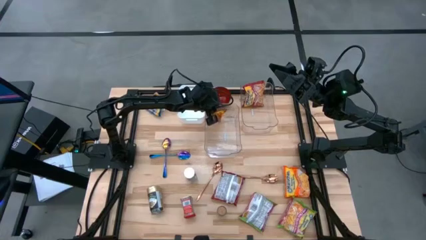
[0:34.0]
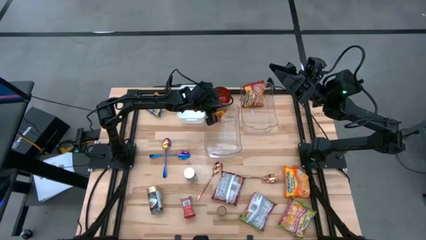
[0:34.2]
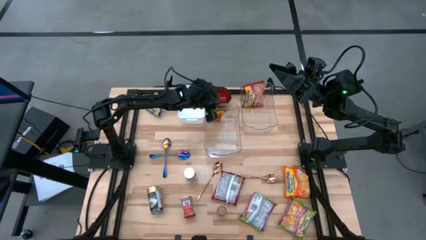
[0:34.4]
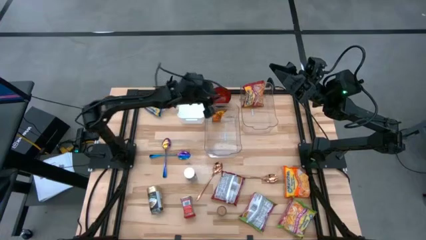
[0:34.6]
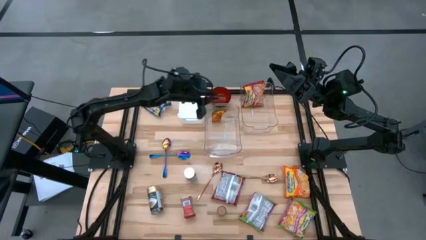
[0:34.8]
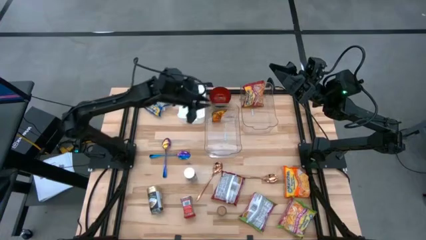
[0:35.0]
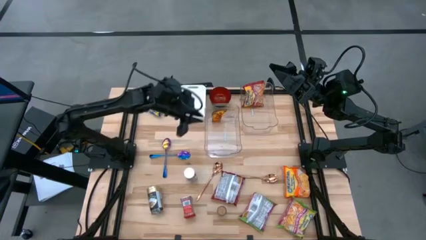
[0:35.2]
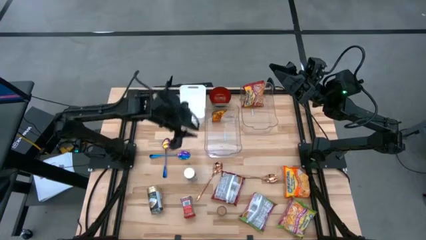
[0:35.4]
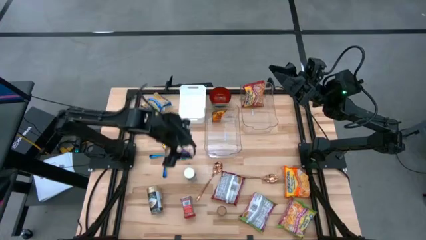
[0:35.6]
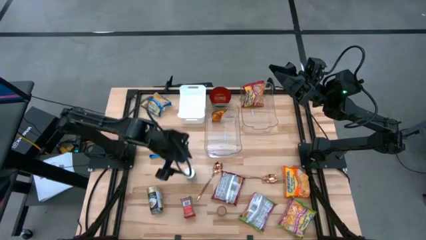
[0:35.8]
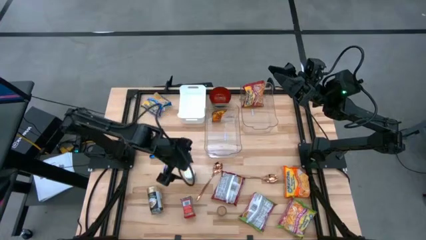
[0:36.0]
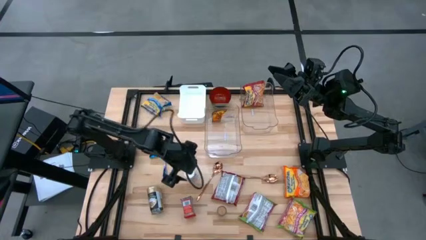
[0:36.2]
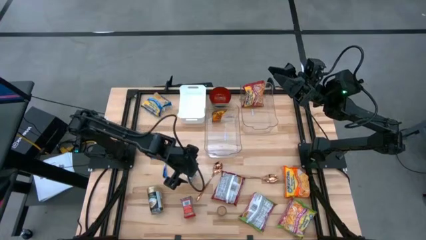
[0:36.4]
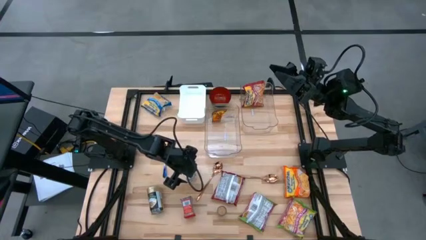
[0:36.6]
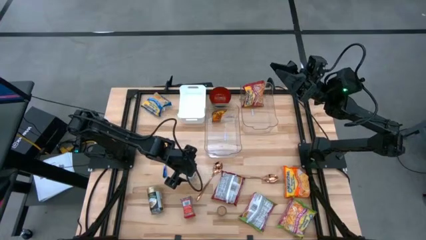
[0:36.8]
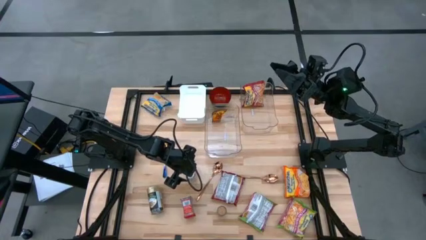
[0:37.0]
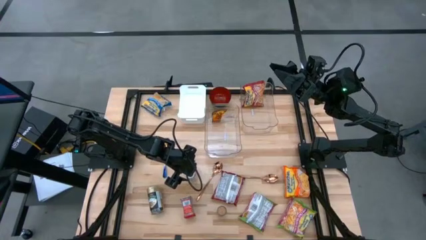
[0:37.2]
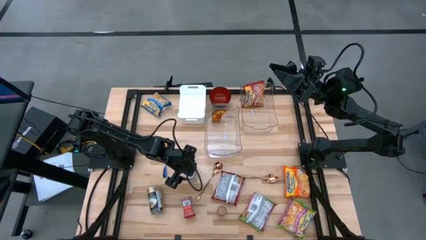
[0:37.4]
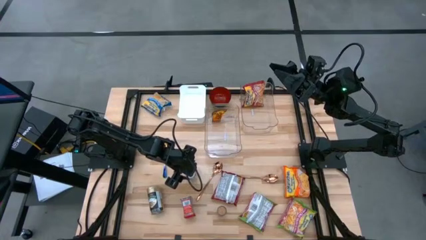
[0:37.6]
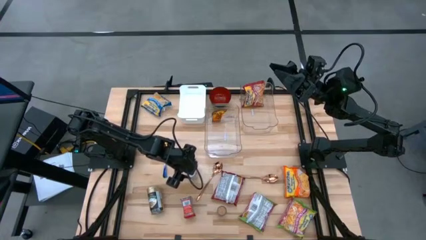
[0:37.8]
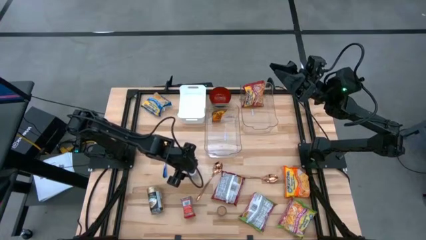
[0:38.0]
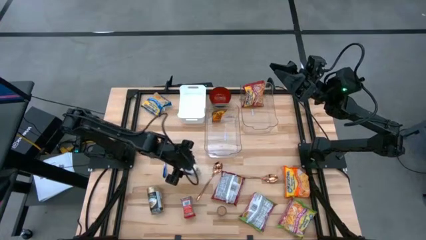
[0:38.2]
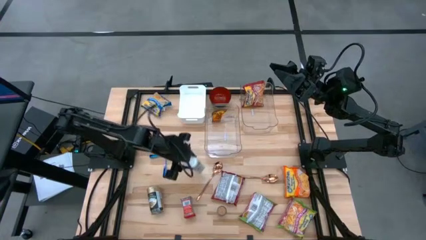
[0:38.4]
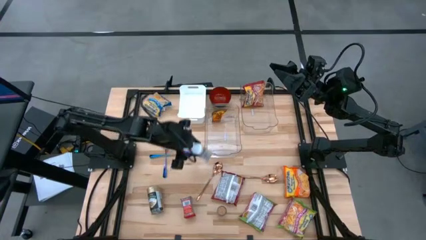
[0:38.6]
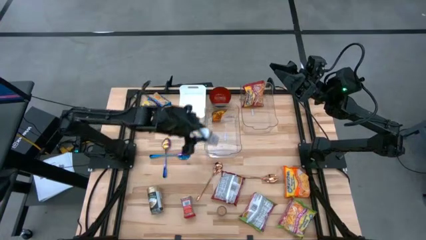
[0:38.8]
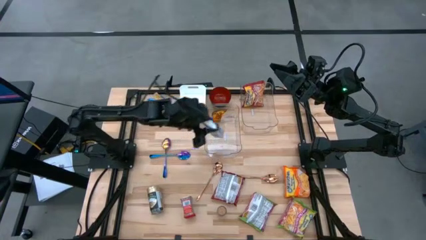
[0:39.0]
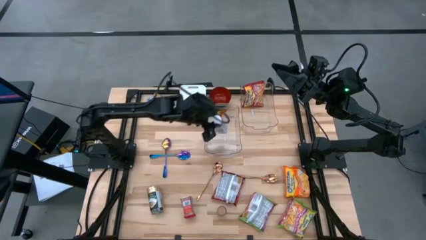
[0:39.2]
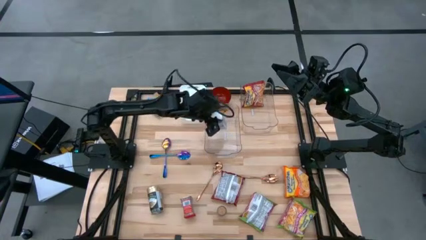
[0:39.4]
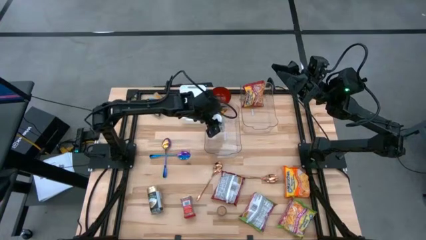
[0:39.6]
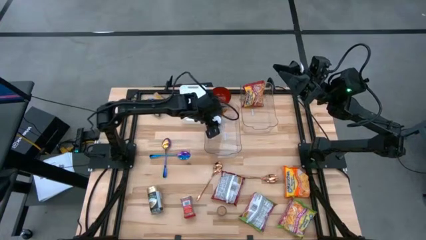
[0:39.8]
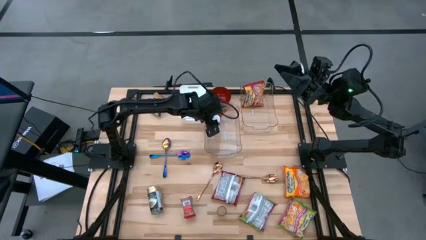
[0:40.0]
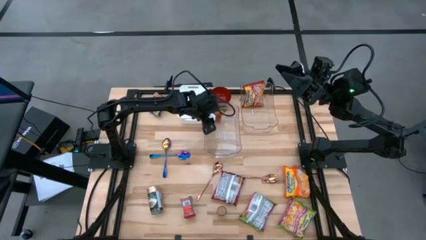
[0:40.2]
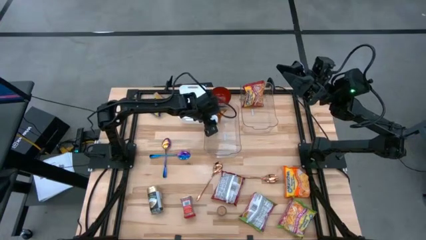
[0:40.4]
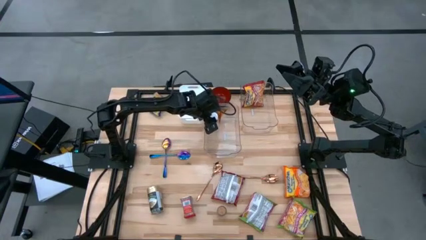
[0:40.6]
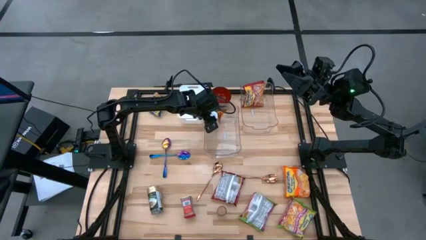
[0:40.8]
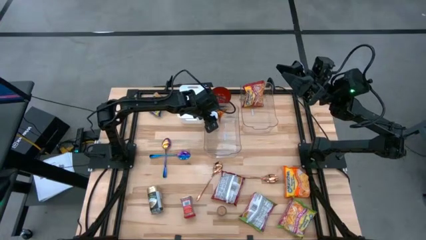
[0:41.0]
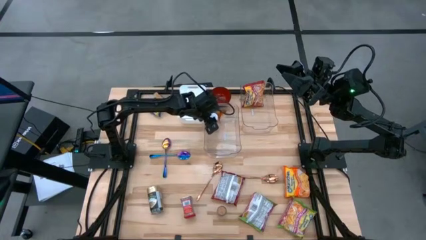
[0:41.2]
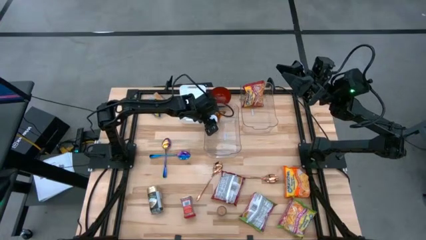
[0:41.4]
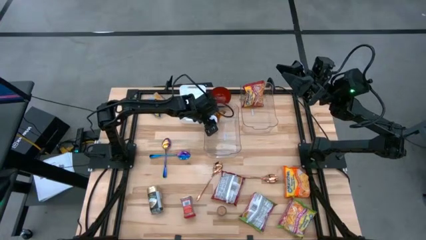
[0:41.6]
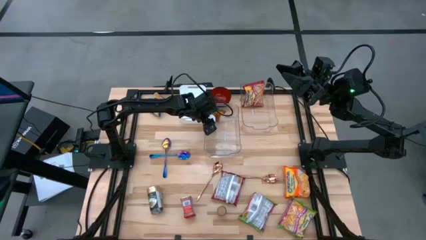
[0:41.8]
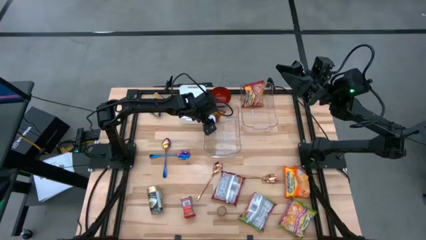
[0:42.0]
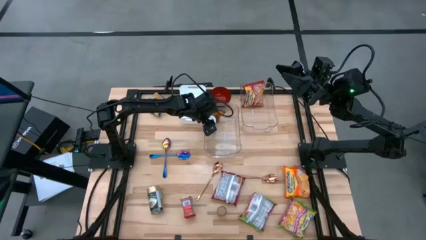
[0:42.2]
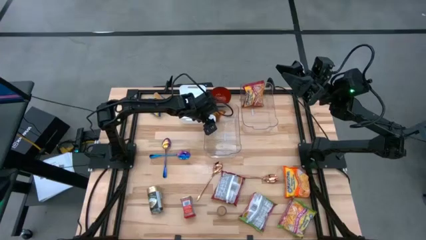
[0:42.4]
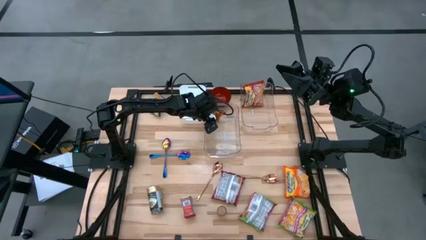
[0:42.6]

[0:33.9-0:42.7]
Task: Pick & Place Food Item
Put the white spice bottle into the left transparent bin

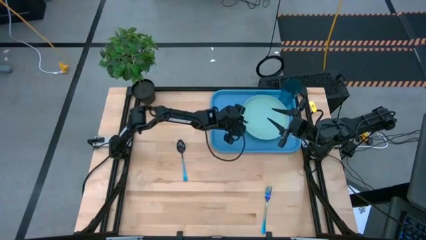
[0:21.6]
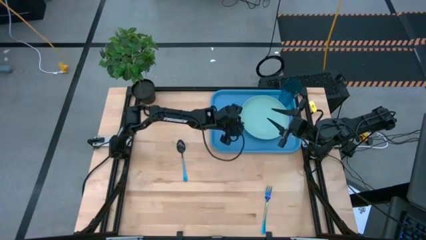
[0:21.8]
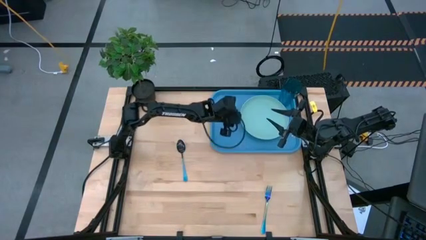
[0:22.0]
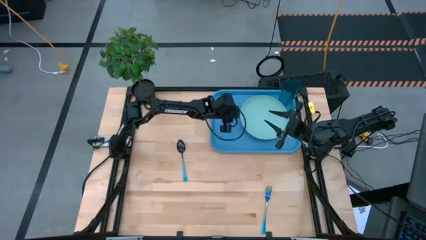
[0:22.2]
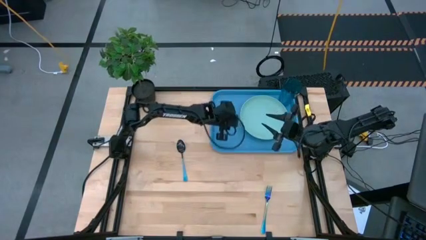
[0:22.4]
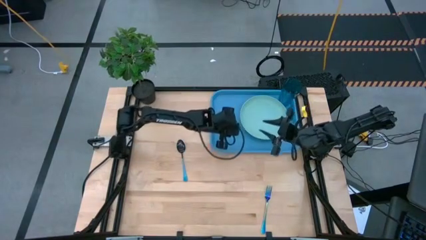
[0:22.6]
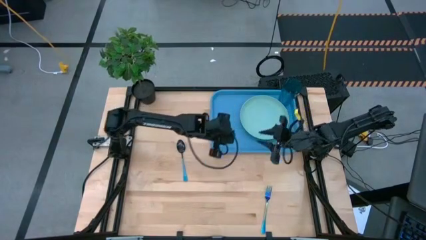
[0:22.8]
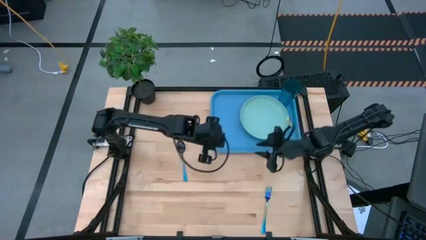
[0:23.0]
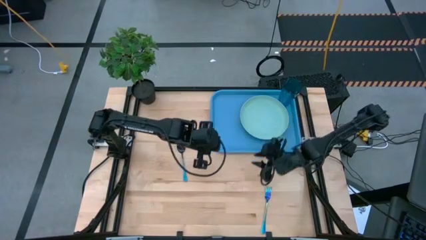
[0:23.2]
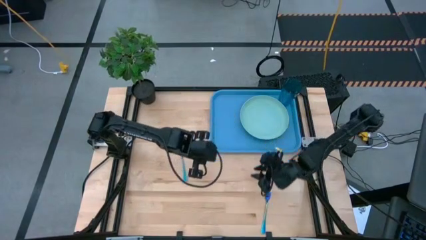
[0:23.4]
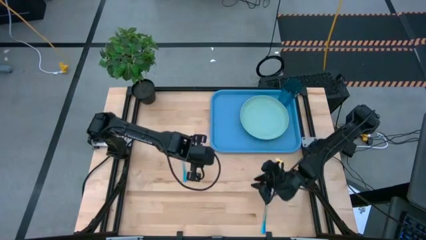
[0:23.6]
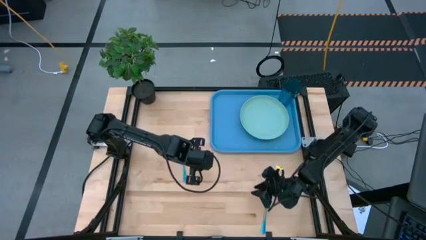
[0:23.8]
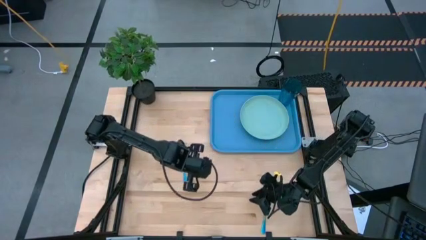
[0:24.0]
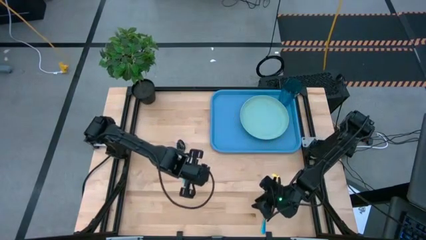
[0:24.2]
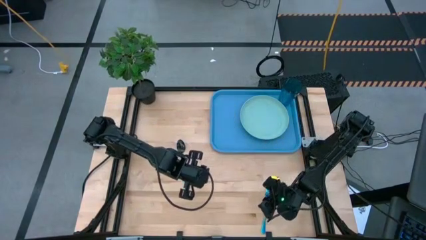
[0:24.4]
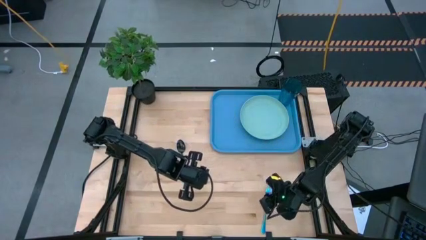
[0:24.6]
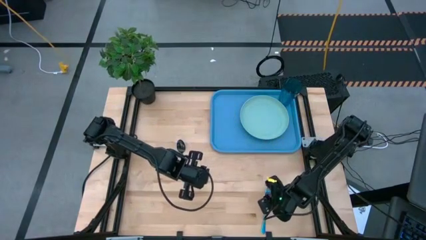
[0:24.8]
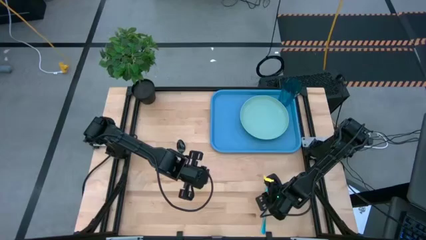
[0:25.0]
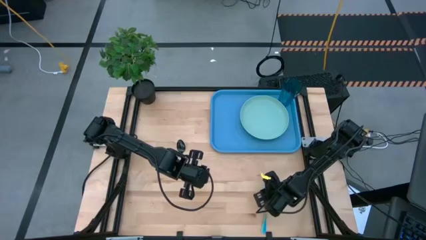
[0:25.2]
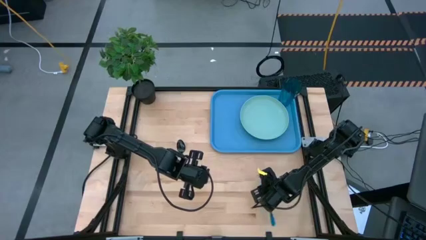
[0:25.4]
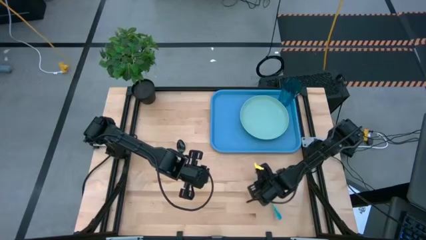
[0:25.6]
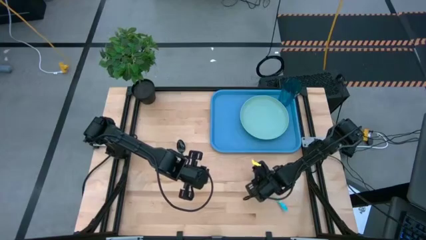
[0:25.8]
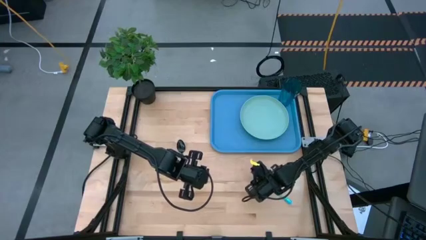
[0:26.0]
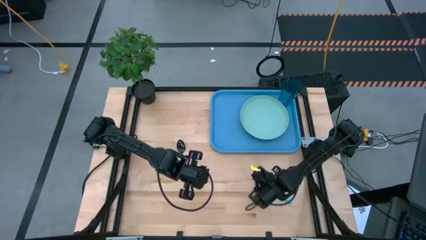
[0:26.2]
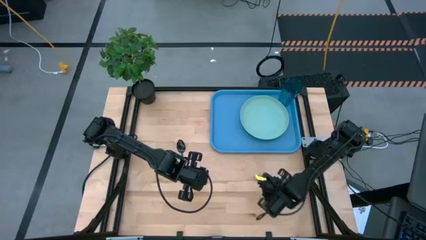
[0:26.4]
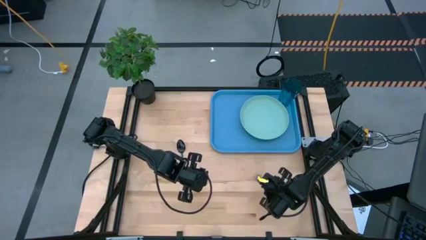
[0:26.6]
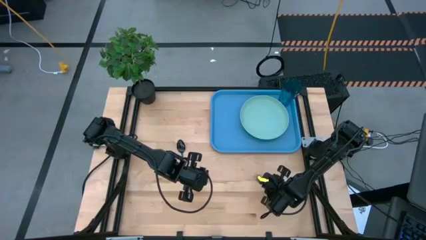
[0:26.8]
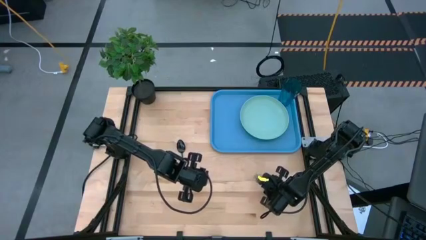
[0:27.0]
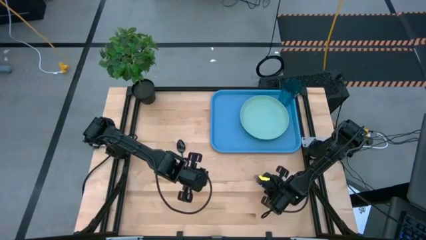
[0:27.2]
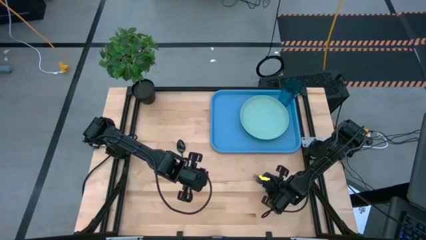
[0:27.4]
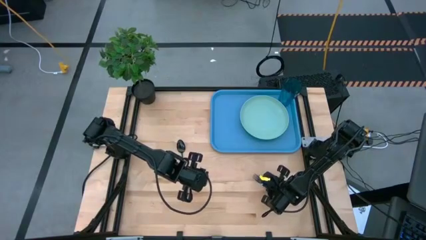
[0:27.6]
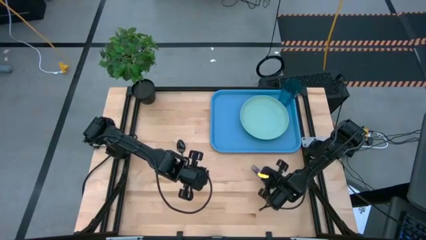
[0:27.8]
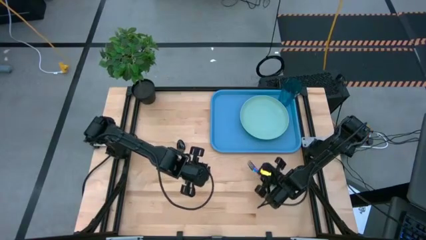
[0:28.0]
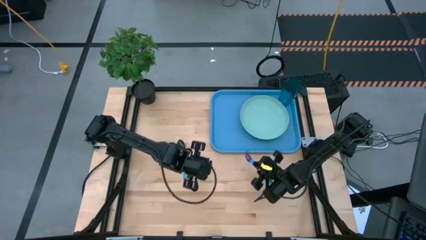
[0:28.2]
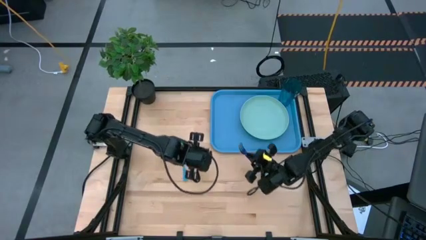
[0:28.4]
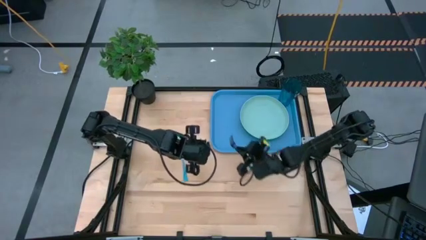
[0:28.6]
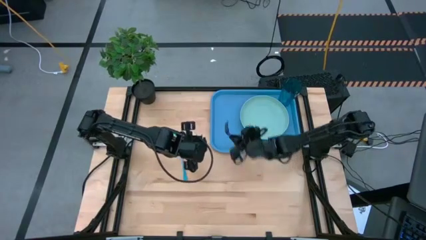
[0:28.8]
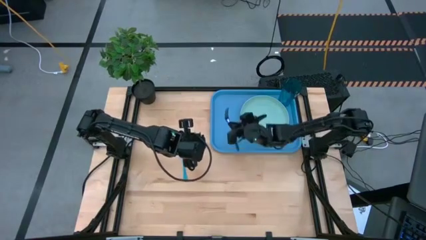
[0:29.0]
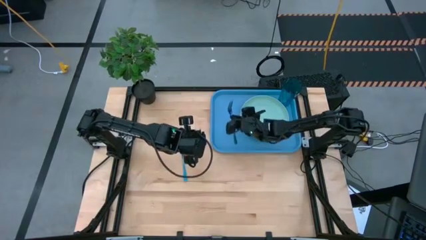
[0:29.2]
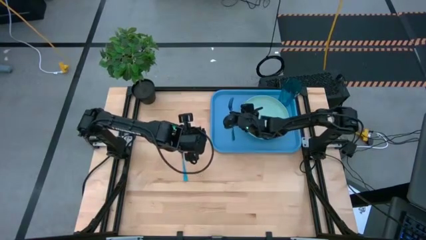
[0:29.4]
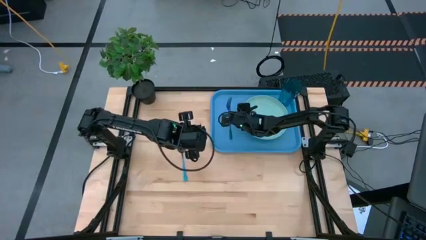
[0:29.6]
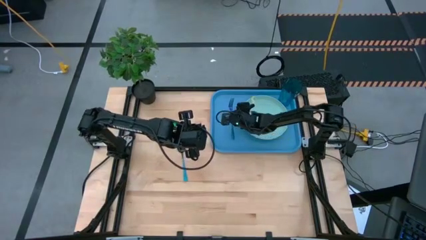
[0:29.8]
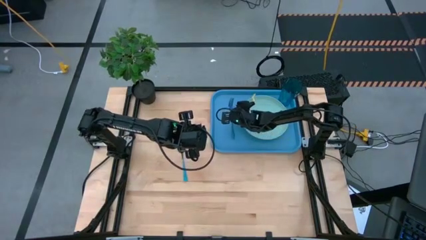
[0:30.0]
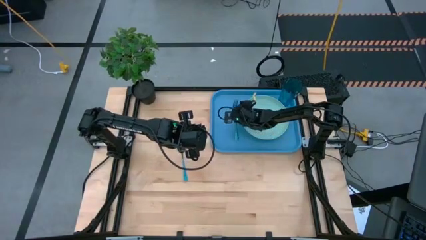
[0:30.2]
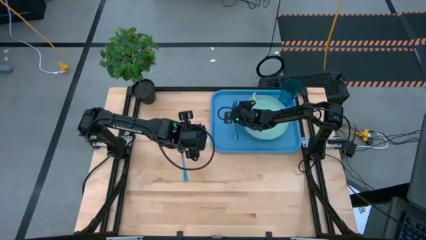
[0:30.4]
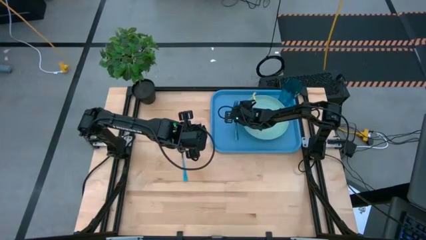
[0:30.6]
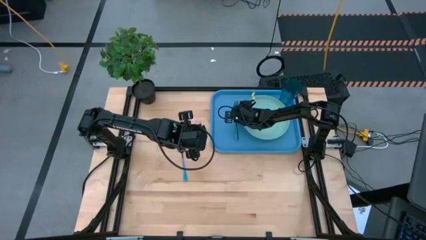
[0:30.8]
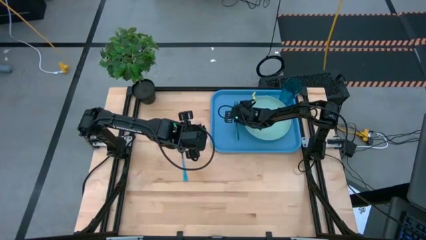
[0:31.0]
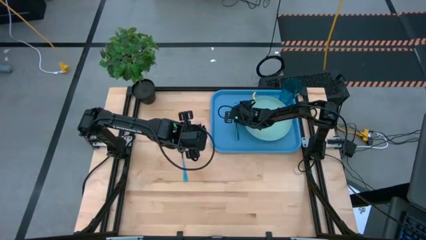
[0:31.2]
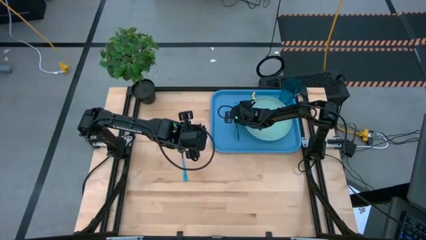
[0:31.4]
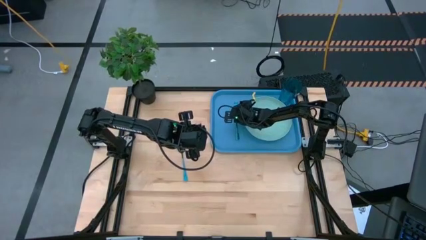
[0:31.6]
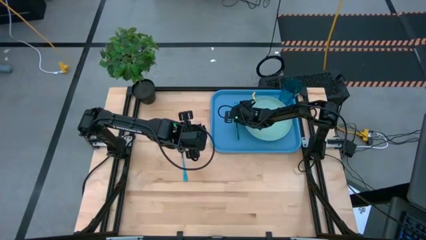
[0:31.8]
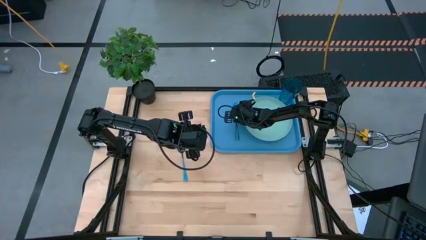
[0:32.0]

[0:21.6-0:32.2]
Task: Pick and place plate/cup/fork/spoon on tray
Put the purple fork on the left side of the light blue plate in the blue serving tray
